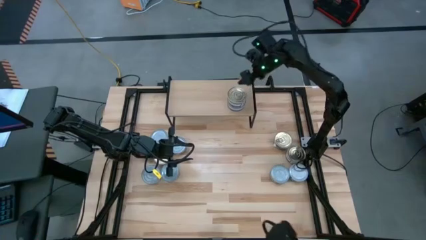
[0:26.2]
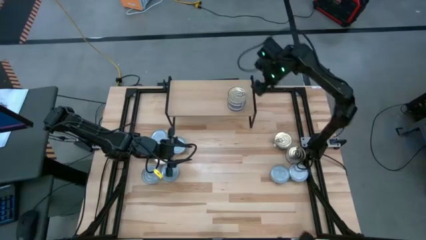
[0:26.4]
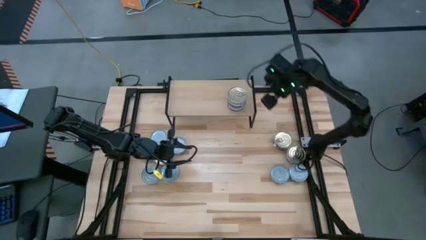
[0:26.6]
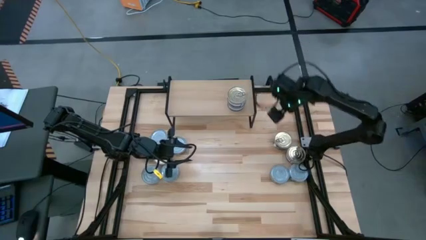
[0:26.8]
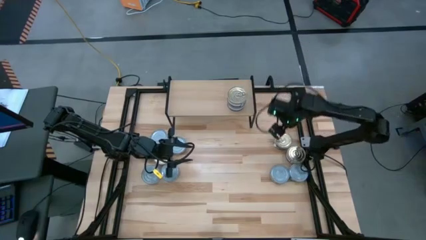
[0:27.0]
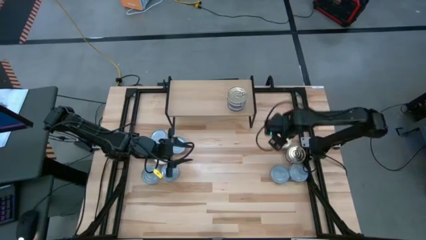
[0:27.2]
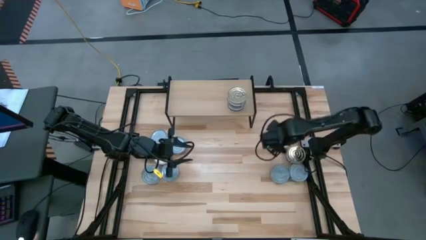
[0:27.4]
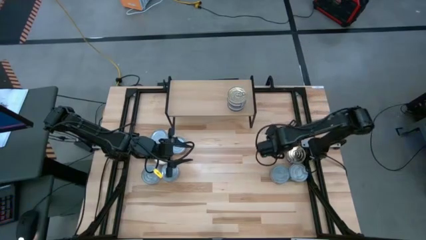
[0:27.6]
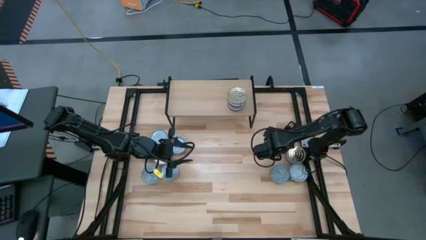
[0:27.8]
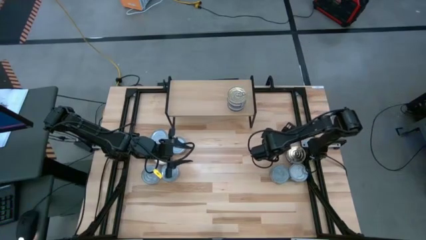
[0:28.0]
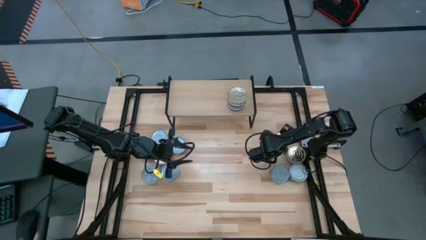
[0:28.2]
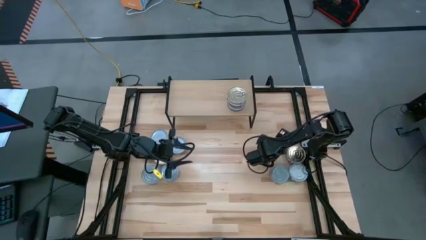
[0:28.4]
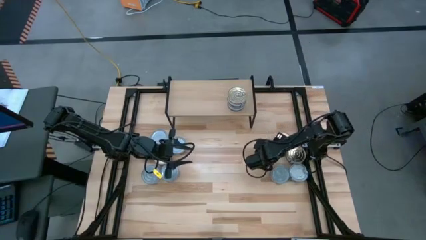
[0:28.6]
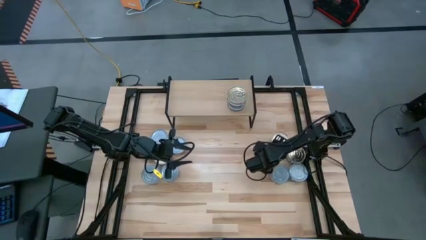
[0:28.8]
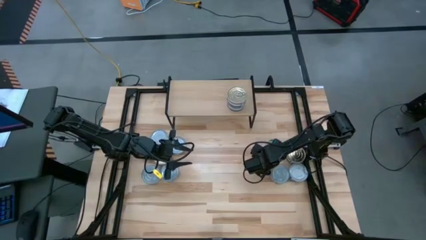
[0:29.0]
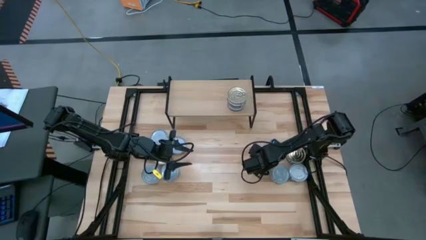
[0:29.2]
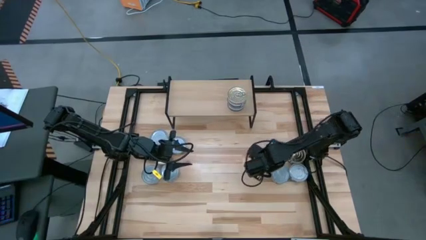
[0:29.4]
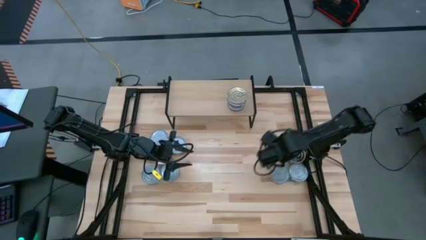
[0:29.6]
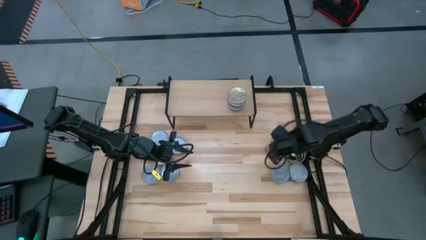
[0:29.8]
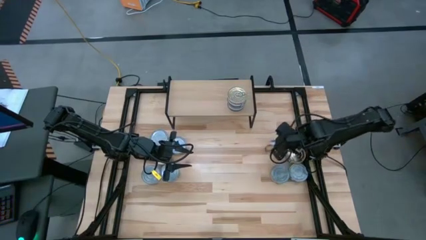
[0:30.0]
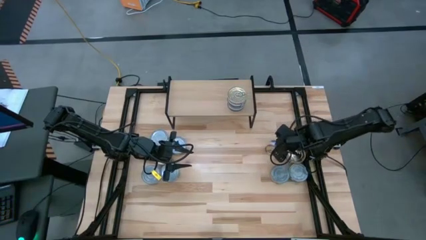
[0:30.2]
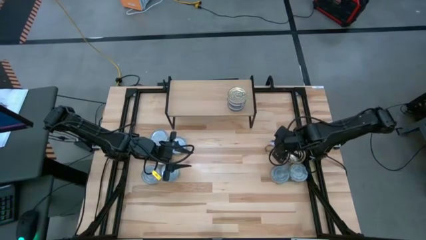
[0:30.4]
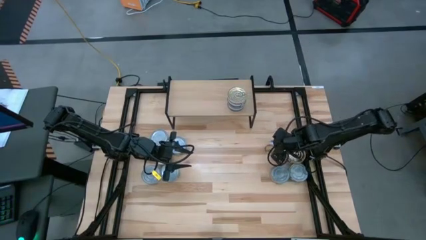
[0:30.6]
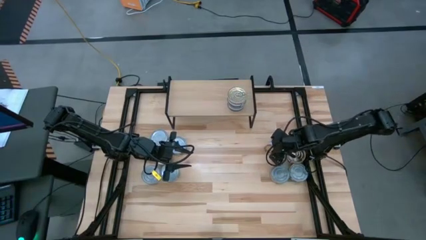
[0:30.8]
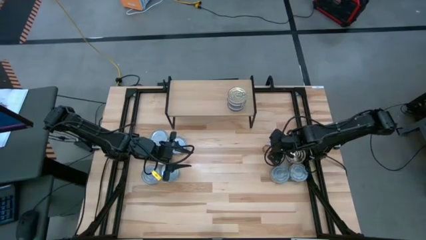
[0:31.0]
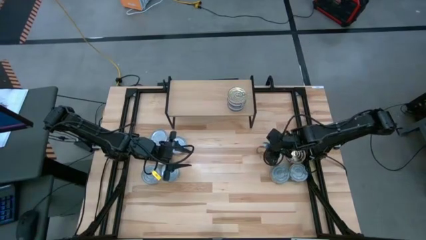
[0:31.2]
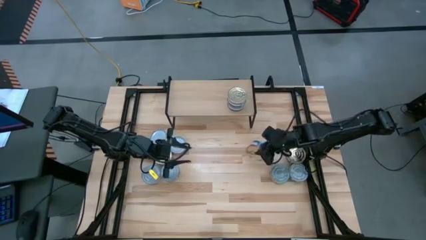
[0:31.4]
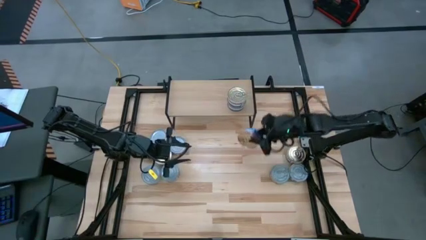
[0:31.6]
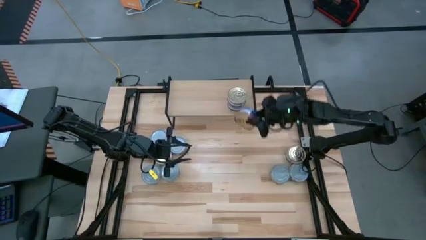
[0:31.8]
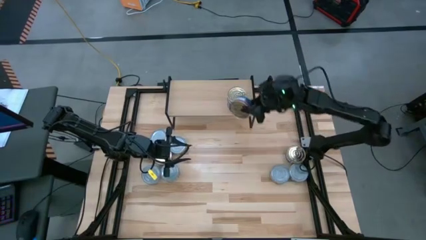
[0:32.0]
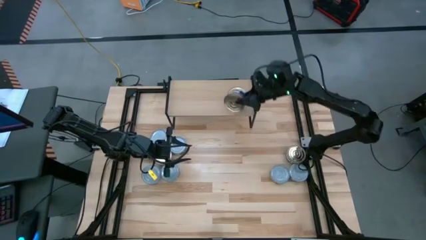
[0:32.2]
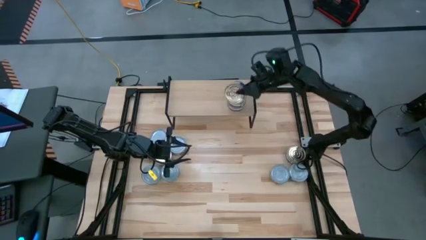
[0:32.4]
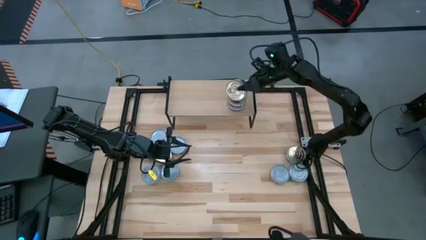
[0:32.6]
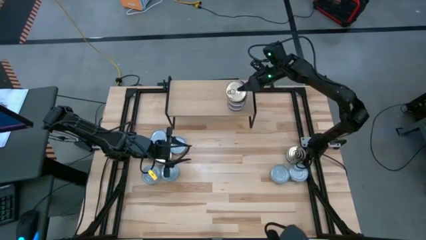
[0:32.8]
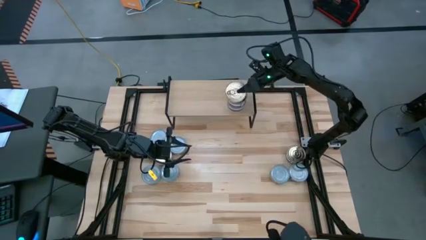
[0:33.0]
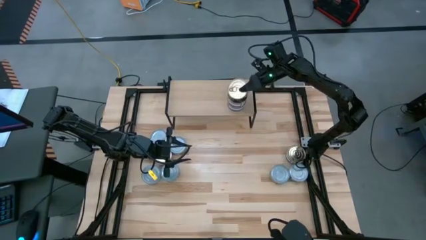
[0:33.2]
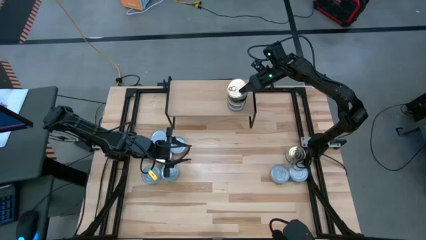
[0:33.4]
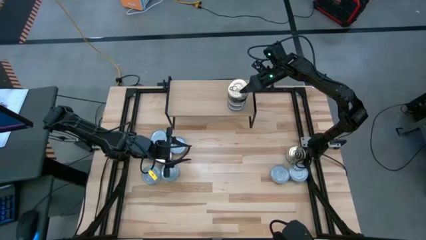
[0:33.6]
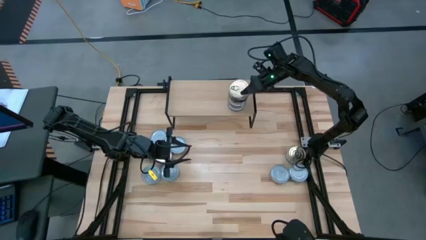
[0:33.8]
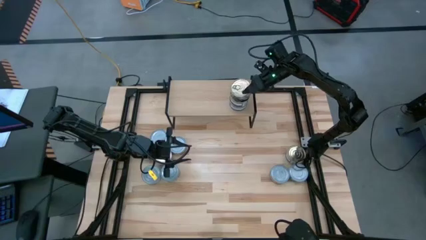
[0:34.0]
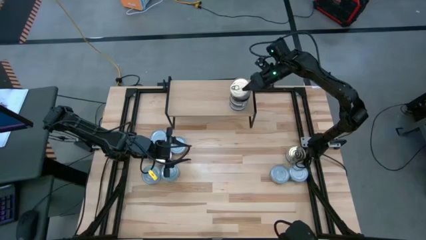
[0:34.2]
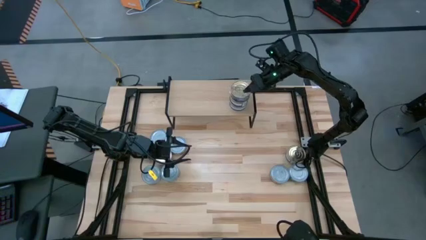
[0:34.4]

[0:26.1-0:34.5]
Task: Stack canned seafood by type on shelf
Stack the pink and blue tuna can on top of the pink and blue tuna can on the shelf

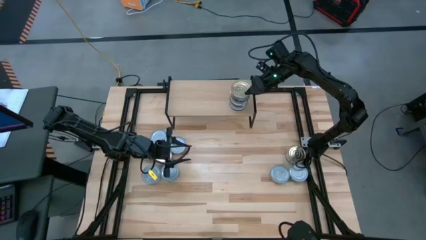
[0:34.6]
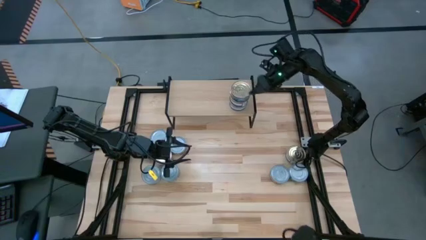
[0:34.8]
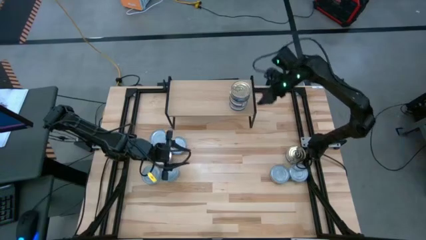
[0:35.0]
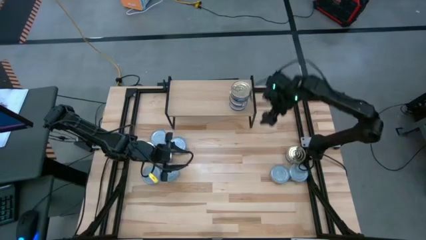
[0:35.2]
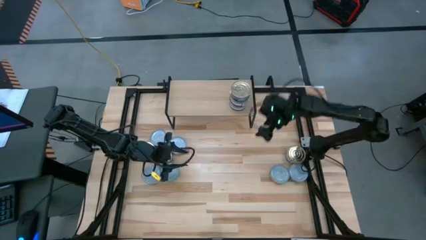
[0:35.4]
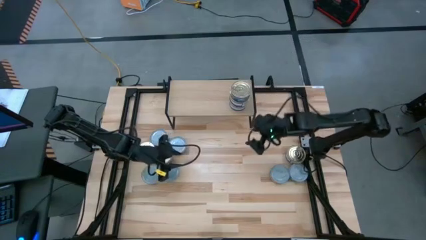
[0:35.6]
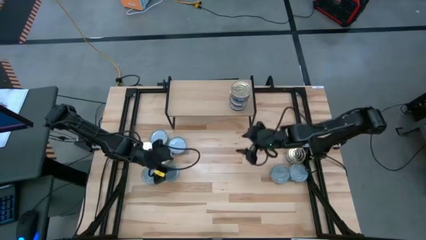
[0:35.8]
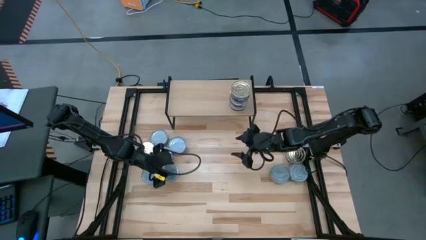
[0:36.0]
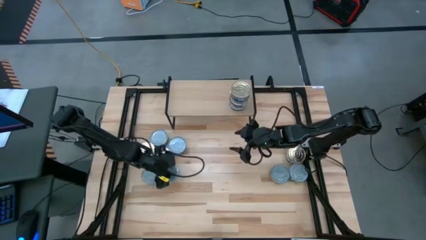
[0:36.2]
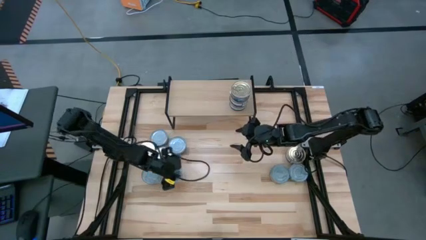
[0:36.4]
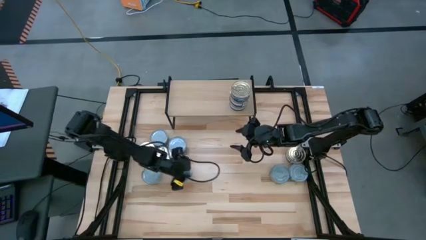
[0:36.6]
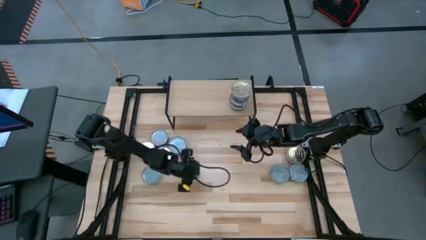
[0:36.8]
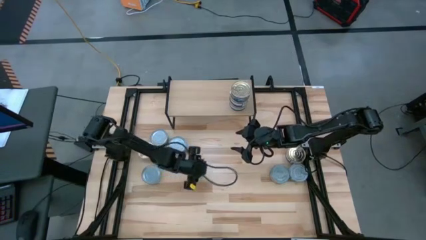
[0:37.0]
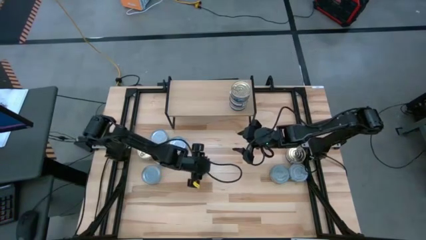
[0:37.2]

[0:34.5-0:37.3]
Move the green tuna can to the center of the table

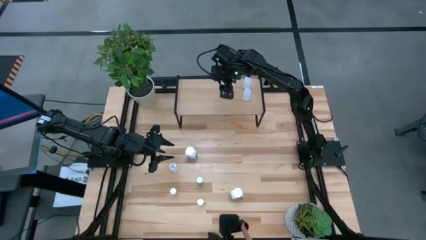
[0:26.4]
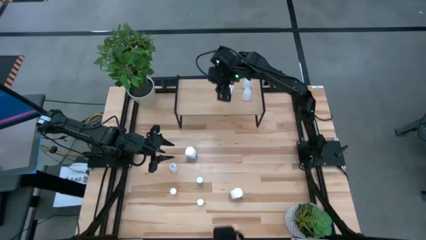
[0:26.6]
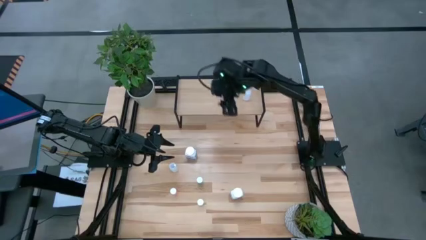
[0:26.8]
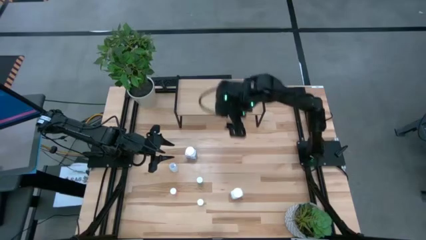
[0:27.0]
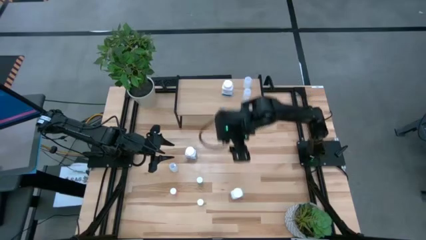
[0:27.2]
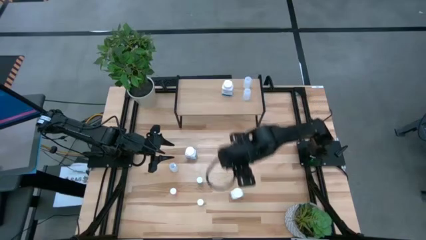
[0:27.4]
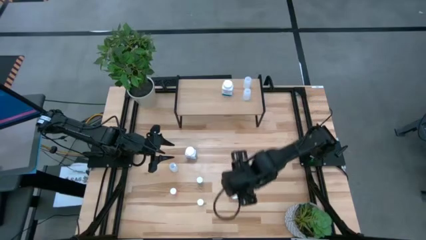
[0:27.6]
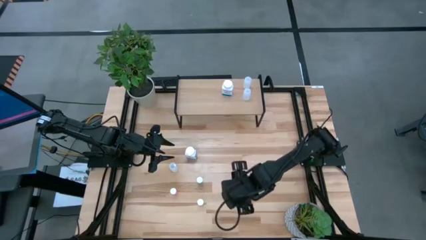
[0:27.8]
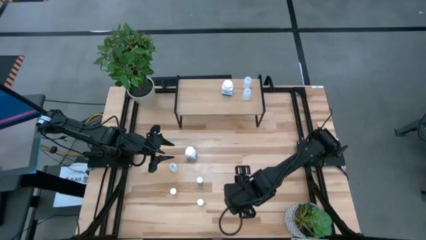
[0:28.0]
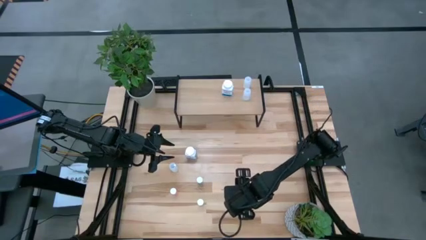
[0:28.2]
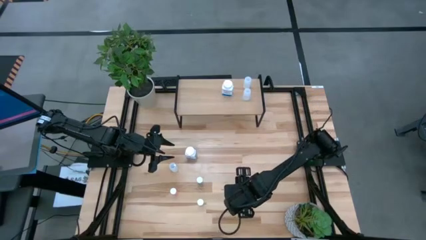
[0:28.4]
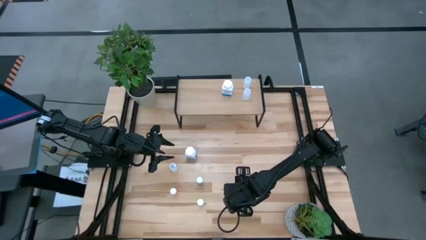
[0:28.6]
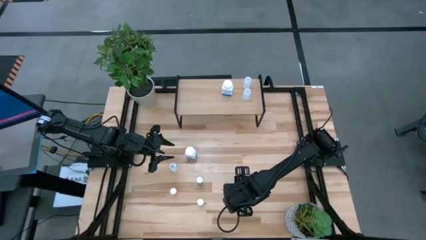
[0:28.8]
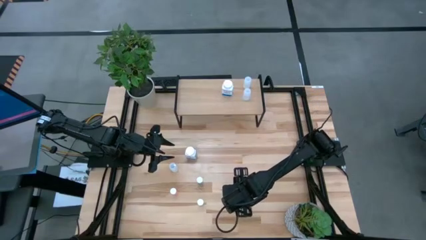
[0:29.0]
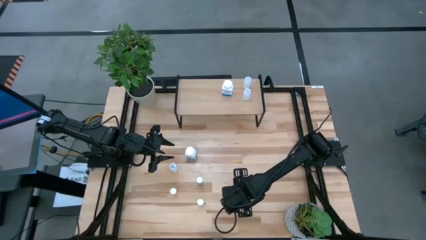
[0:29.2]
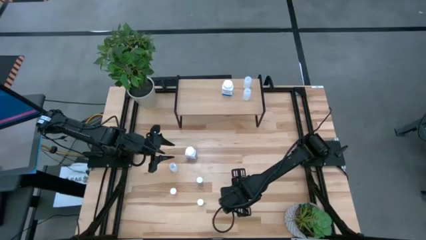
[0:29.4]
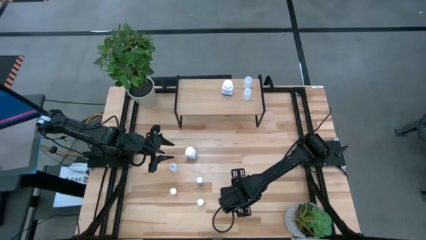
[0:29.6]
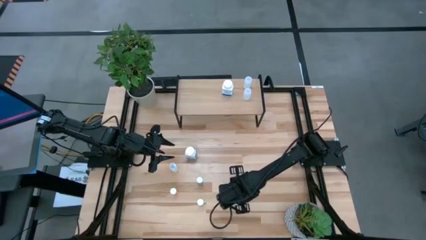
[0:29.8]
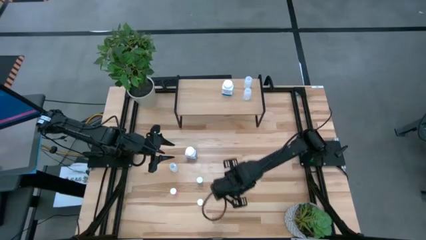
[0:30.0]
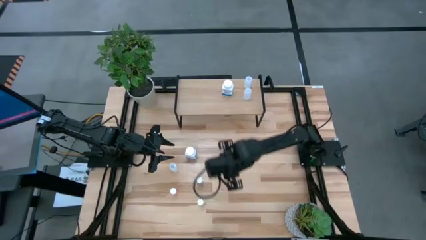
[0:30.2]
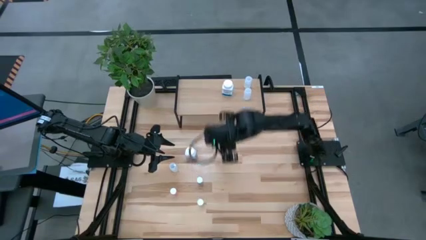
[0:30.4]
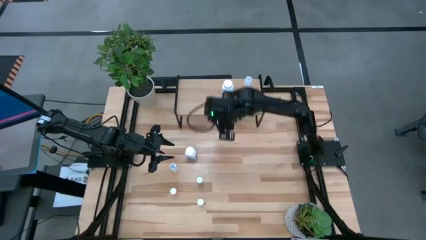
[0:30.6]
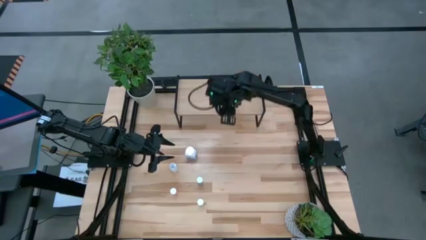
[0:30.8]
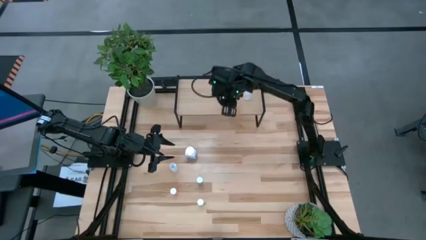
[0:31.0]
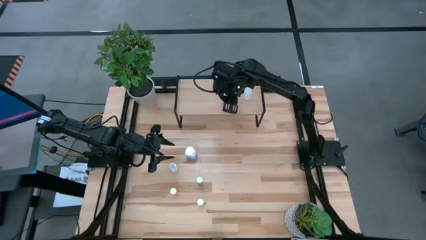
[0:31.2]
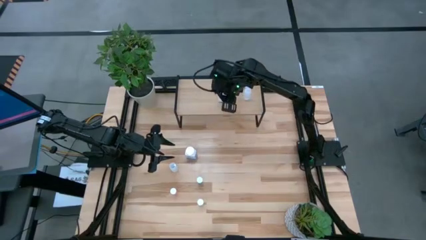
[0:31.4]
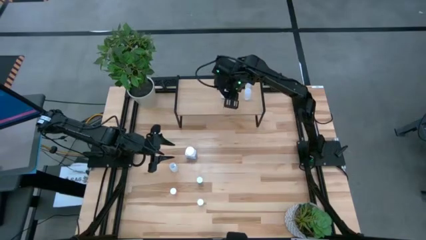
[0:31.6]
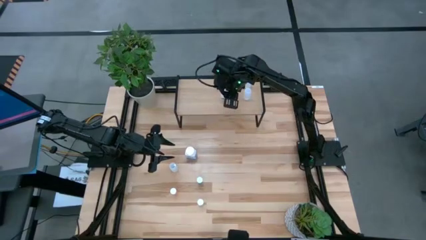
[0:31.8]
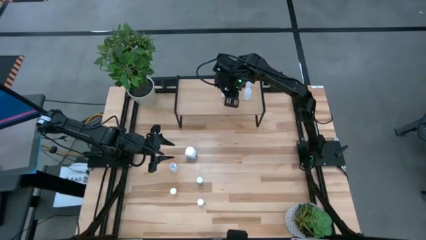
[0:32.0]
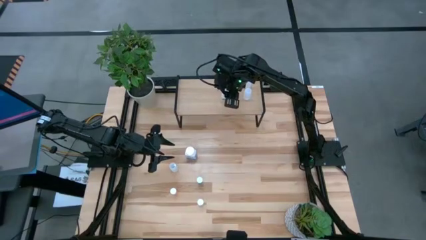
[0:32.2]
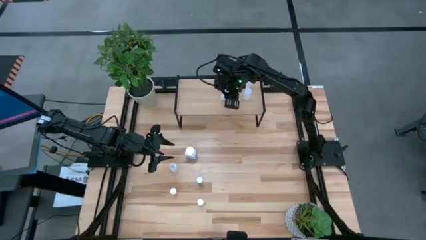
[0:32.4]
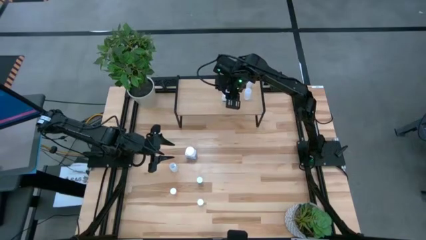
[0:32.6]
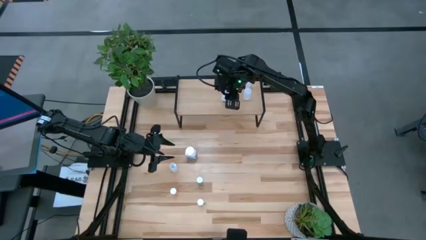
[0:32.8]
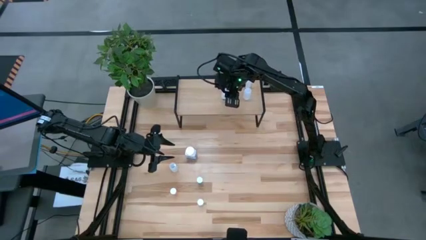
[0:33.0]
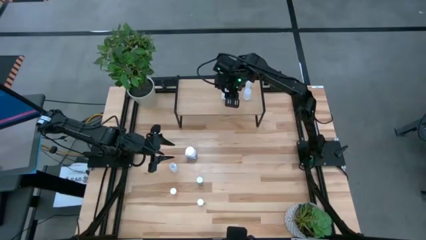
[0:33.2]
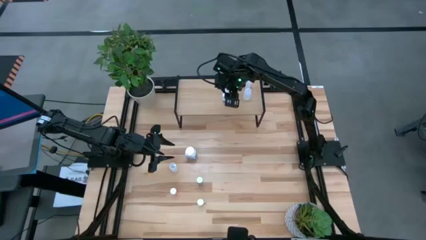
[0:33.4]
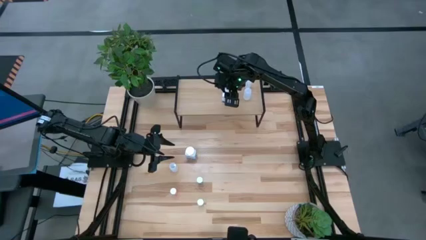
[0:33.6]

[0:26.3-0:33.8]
Task: Pick and place medicine bottles onto shelf by color
Align the bottom white and blue bottle with the other white and blue bottle on the shelf
